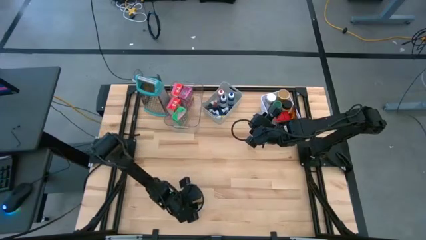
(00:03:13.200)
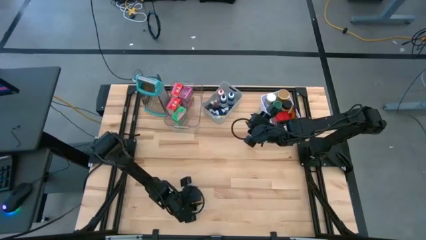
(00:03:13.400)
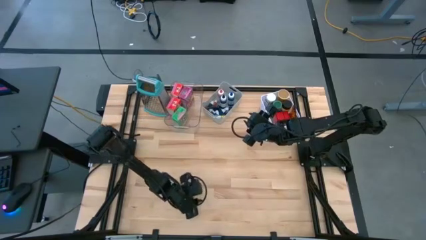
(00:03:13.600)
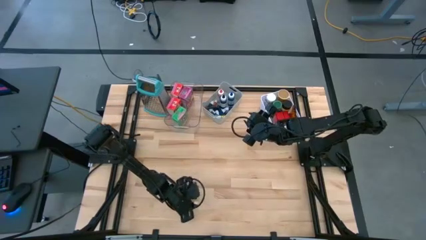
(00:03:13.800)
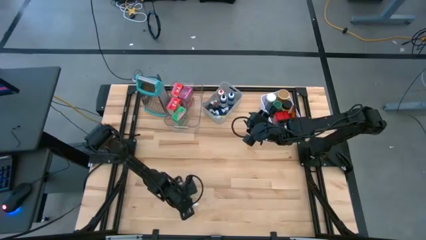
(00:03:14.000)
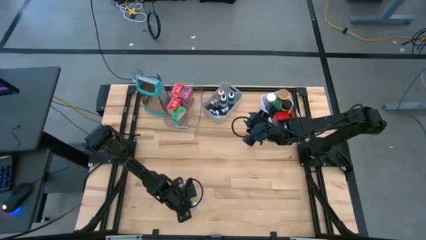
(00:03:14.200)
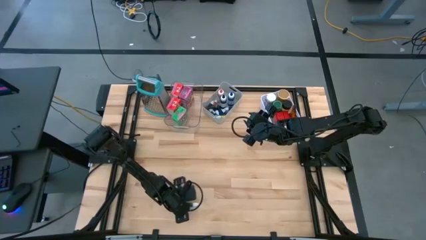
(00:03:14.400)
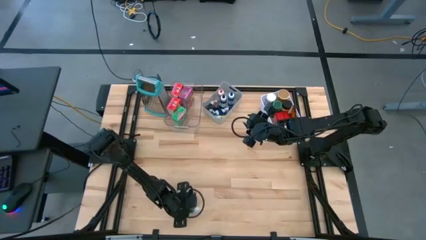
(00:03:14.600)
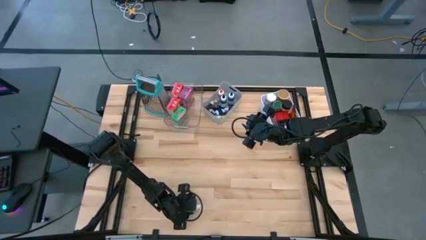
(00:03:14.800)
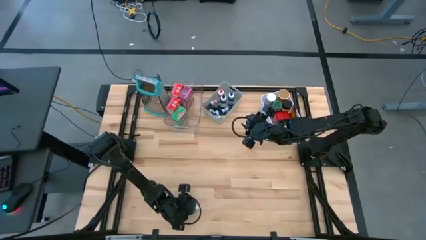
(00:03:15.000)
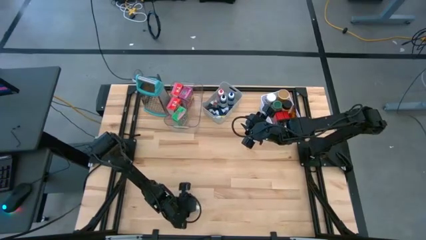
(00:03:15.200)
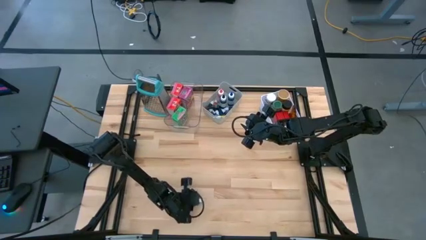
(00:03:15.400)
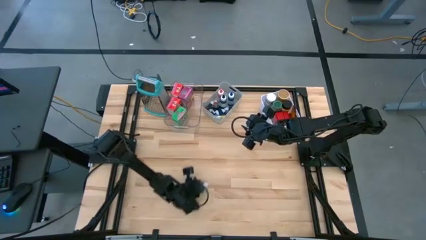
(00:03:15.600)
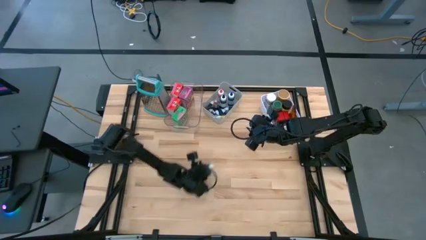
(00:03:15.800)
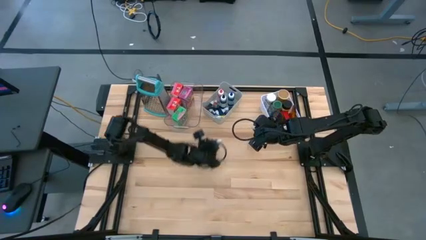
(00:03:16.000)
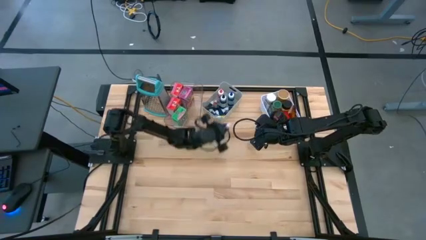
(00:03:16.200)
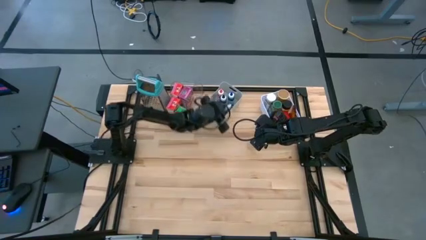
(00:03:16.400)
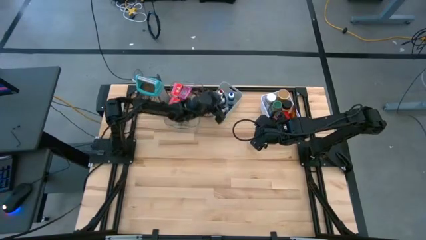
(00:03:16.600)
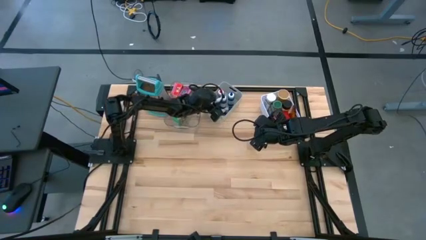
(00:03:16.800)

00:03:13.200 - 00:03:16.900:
Task: Pick & Place Kitchen Items
Put the small green food coloring bottle into the gray bin

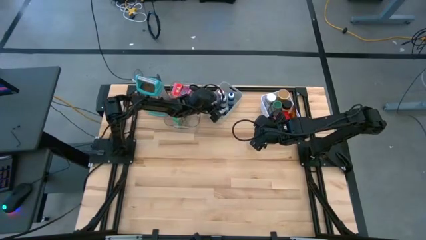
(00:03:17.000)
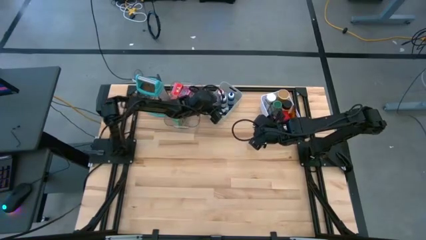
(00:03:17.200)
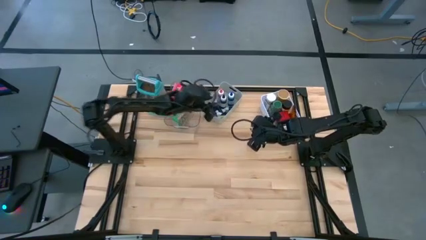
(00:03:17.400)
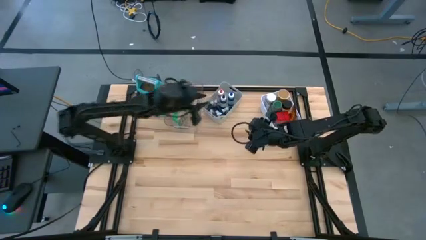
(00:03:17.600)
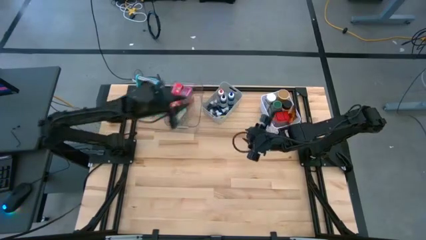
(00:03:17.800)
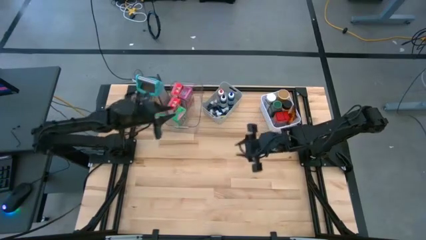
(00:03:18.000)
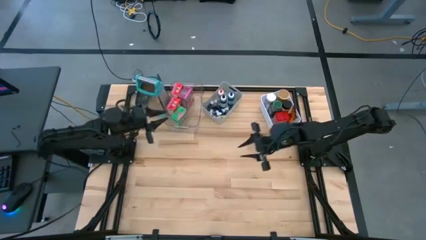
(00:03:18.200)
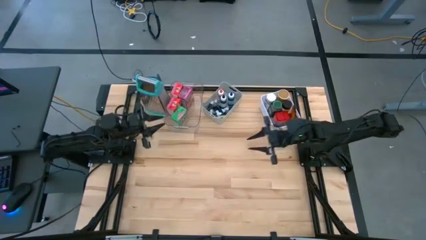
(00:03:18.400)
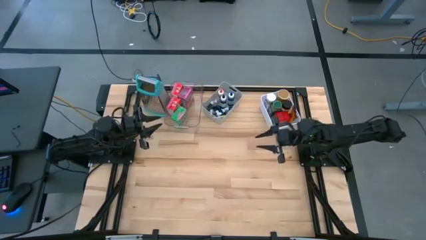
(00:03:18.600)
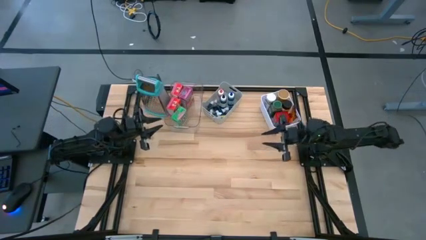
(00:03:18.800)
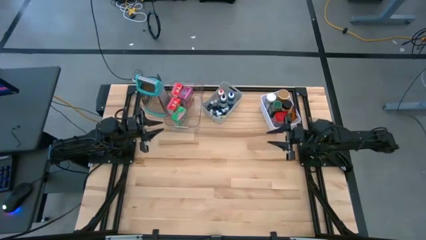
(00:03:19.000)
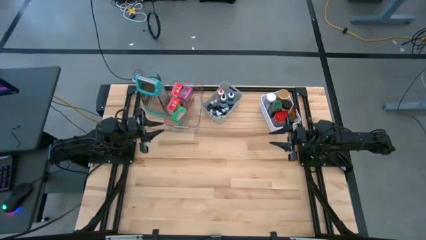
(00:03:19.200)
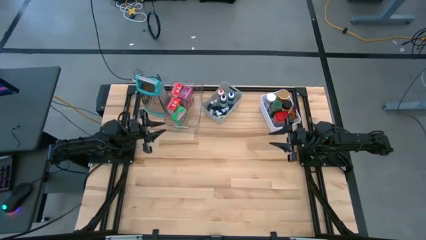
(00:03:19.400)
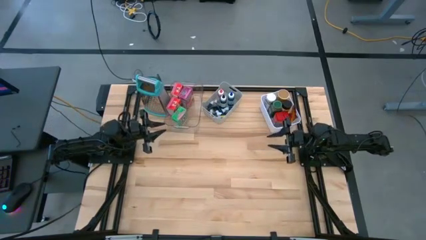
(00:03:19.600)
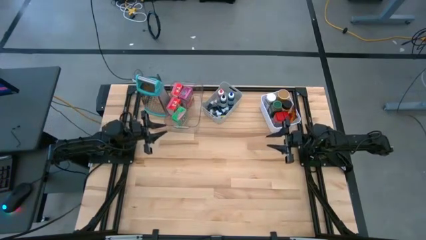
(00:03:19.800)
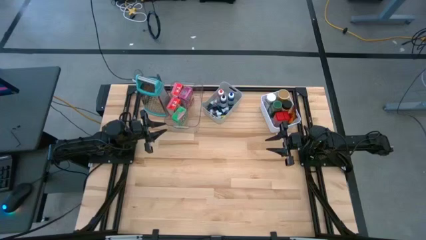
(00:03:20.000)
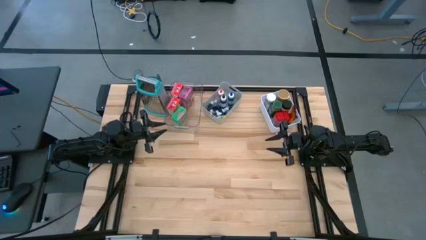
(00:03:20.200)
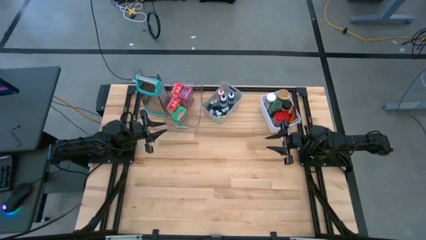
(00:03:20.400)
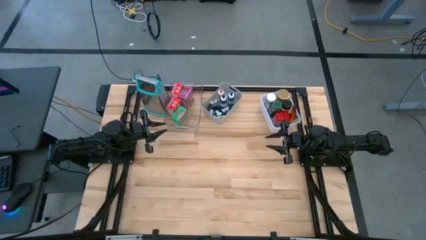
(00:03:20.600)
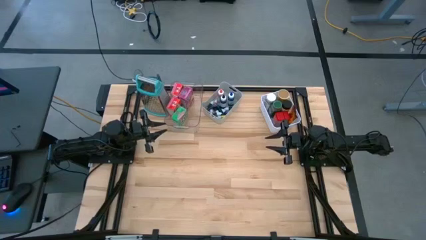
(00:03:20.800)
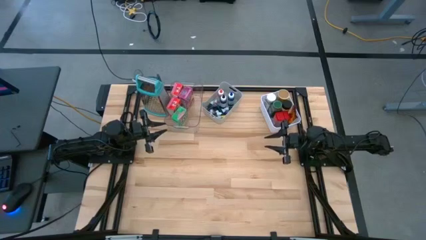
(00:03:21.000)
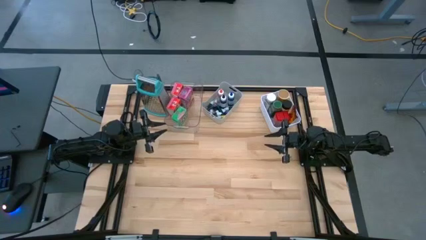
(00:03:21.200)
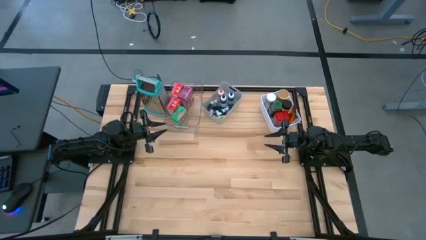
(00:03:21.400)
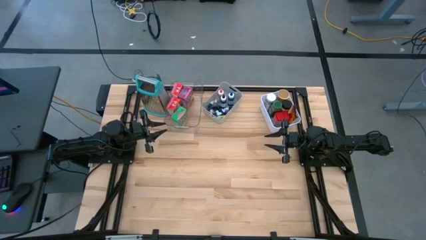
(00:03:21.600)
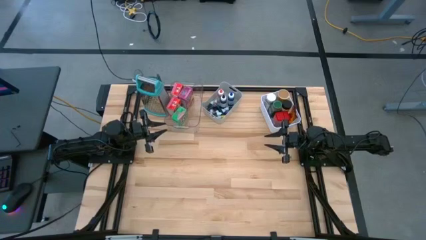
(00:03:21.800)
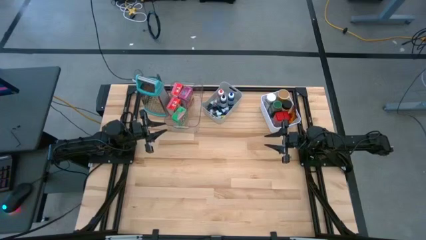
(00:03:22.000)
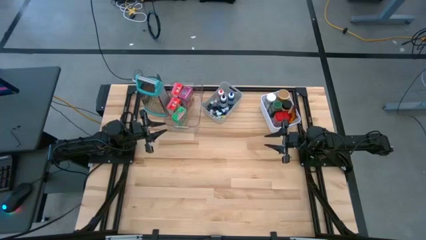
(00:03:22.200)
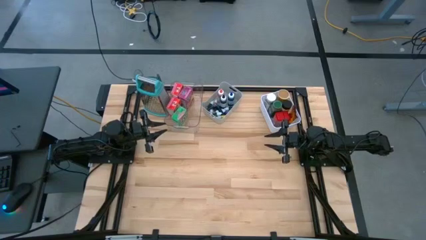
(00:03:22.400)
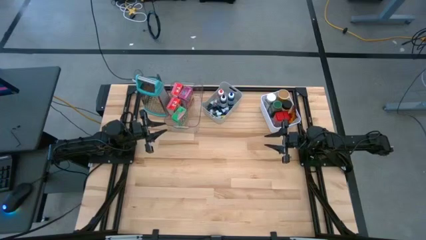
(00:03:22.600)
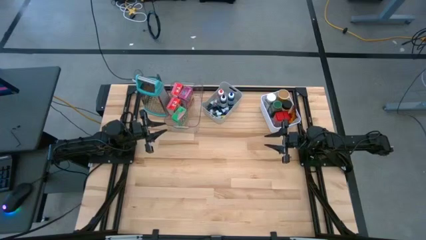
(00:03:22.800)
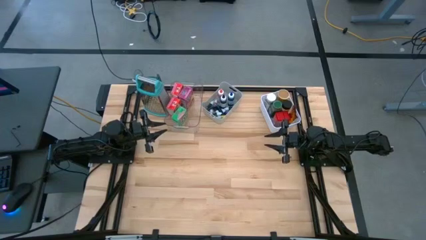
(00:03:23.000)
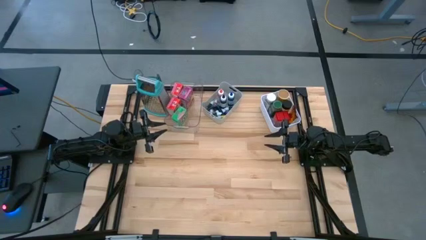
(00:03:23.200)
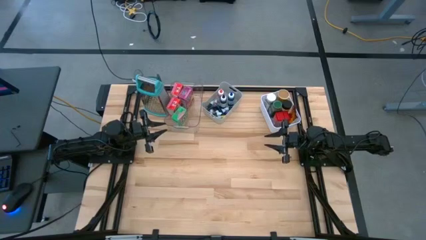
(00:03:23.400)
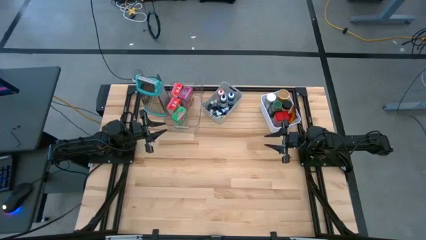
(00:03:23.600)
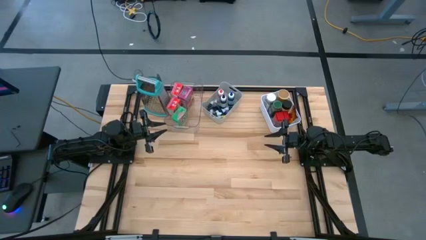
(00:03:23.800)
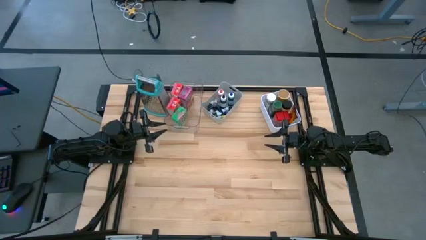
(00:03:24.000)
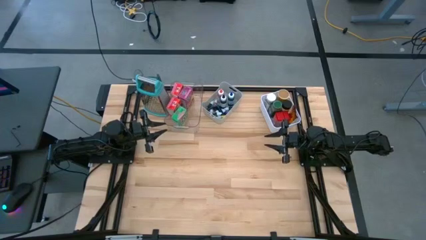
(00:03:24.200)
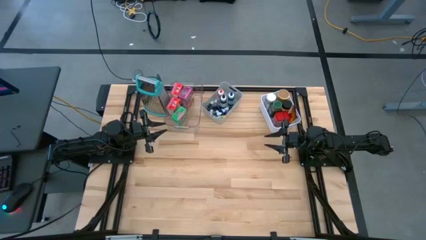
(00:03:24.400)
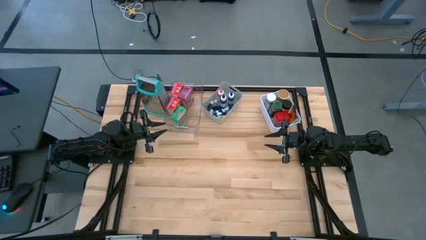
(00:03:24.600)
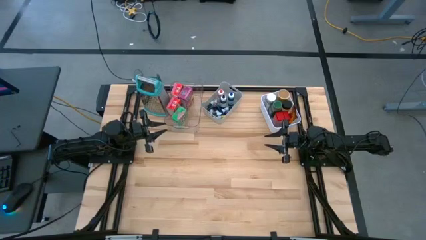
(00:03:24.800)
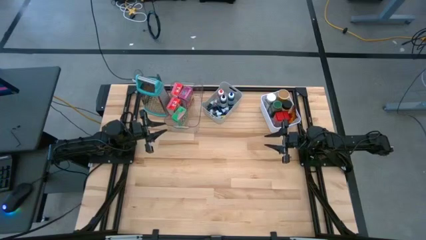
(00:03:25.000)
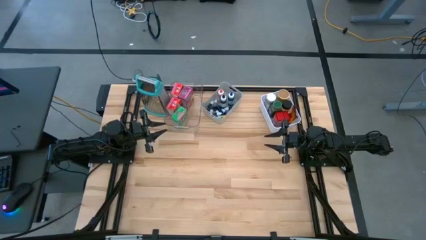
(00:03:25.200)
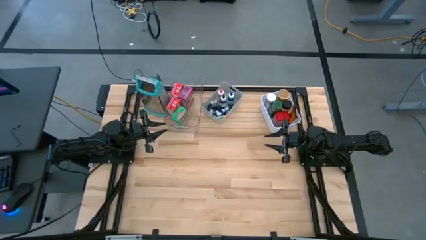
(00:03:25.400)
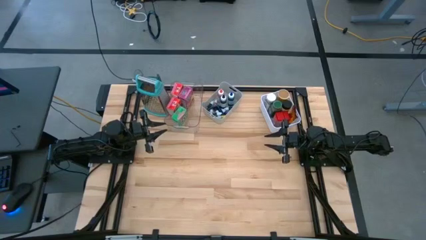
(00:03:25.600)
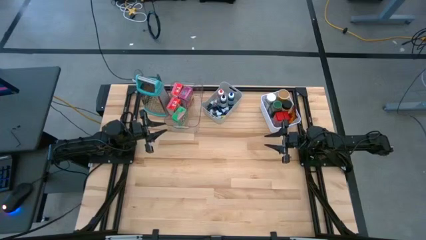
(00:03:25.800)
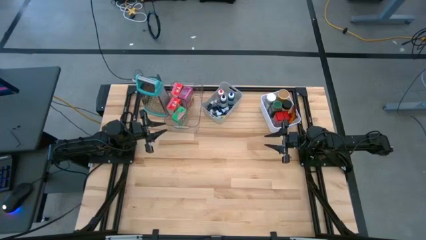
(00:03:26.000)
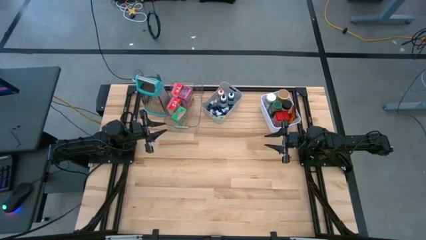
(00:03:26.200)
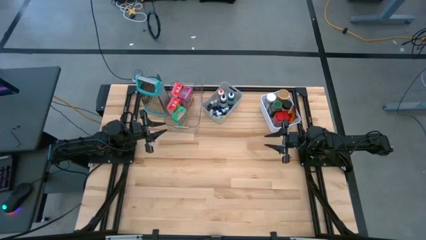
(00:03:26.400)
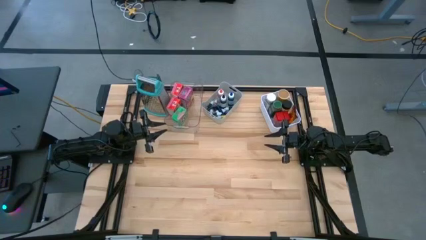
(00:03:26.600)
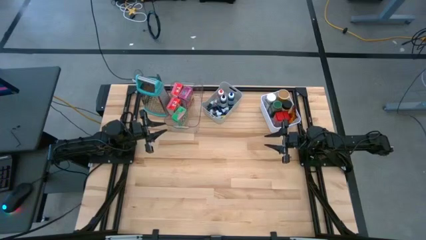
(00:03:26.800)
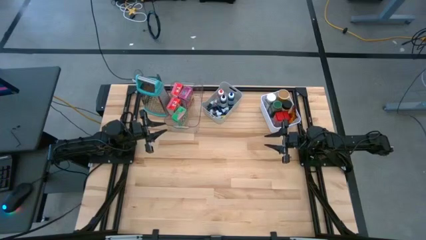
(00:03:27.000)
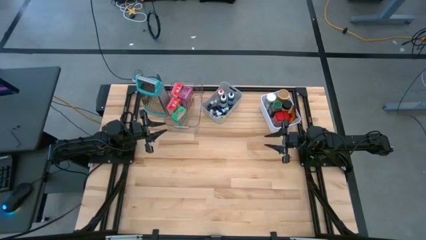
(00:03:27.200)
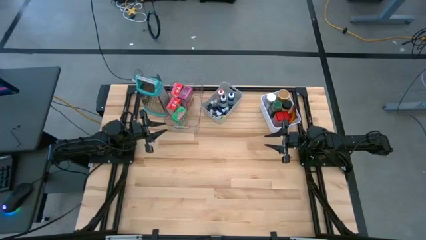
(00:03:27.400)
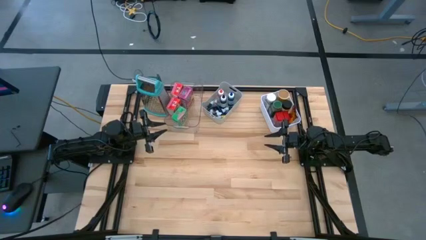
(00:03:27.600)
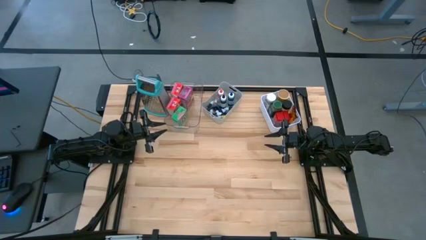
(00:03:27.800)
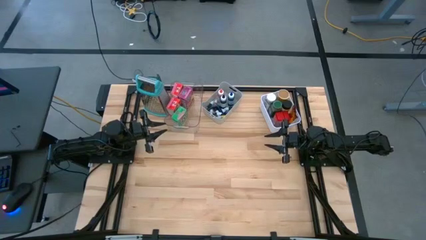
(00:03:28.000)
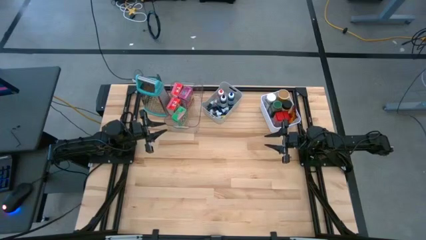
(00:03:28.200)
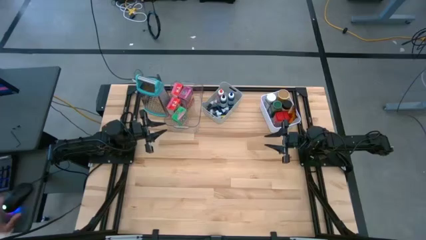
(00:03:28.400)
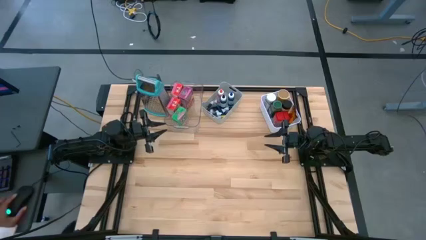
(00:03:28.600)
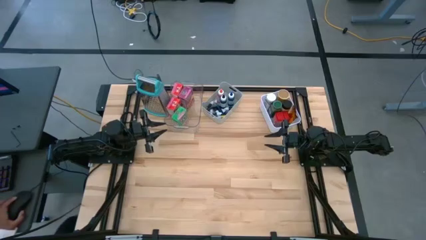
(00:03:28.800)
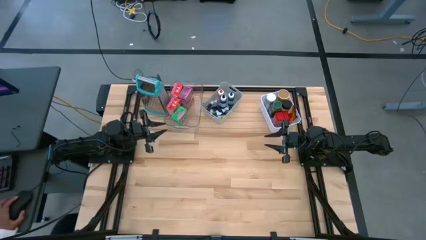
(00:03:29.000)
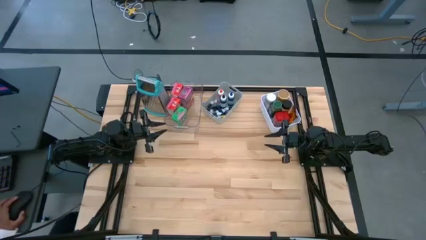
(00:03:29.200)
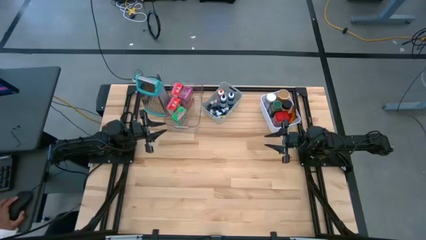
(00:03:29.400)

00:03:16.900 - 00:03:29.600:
Return to home position
